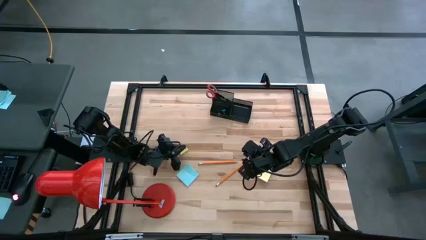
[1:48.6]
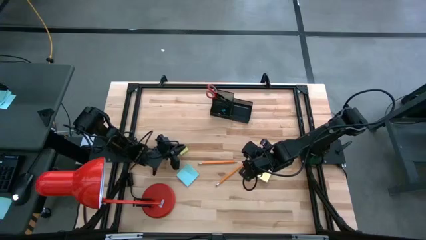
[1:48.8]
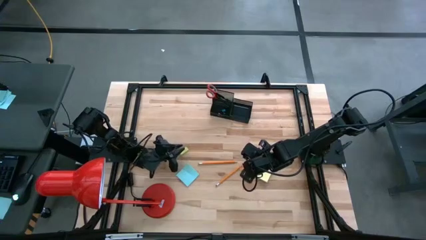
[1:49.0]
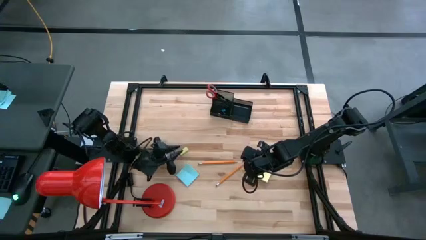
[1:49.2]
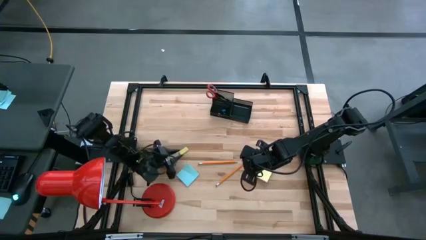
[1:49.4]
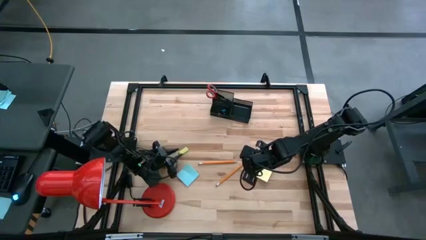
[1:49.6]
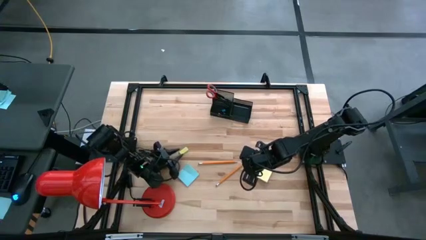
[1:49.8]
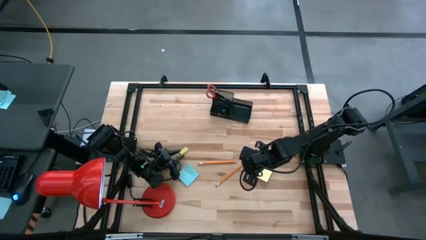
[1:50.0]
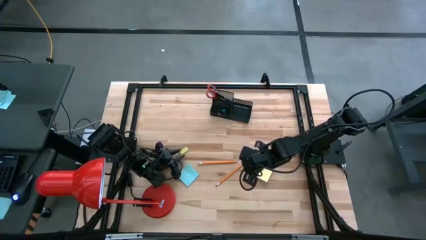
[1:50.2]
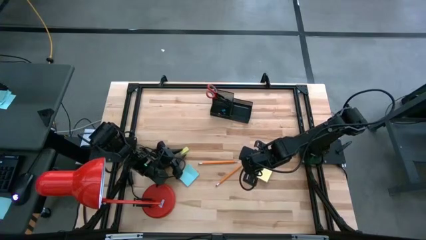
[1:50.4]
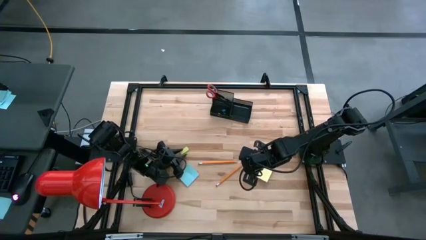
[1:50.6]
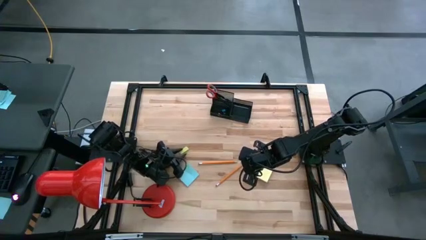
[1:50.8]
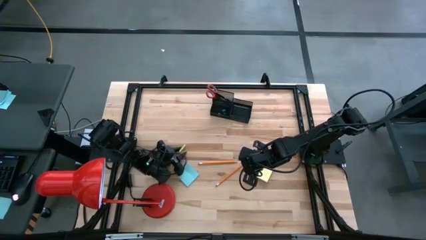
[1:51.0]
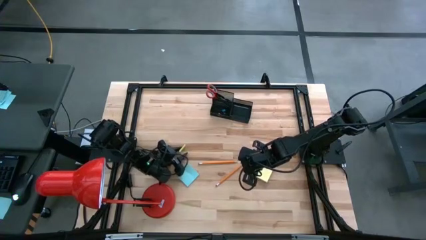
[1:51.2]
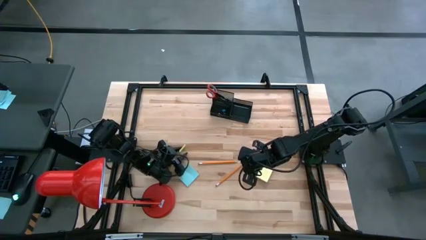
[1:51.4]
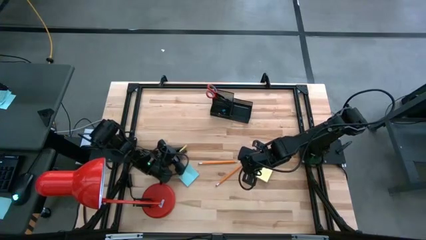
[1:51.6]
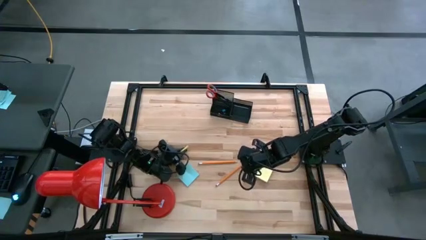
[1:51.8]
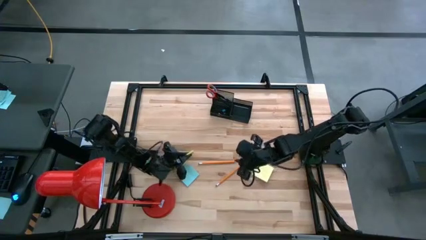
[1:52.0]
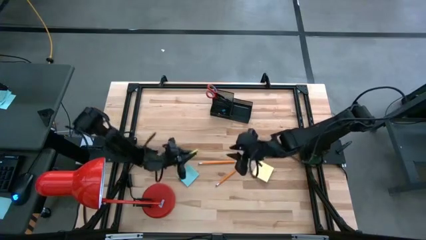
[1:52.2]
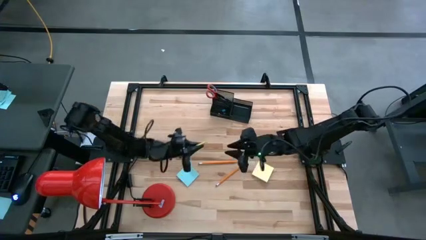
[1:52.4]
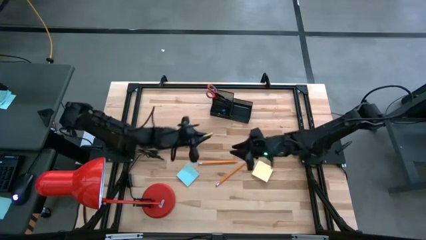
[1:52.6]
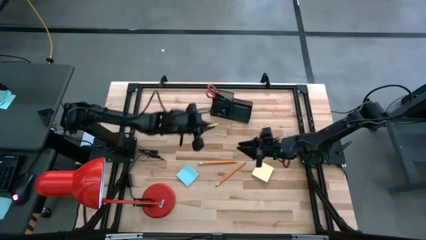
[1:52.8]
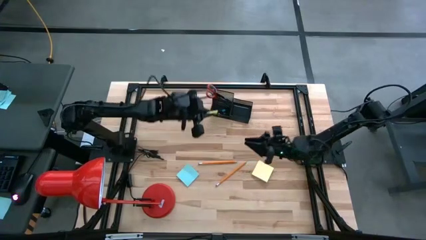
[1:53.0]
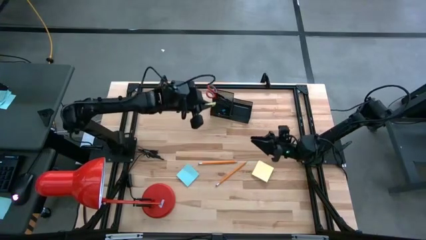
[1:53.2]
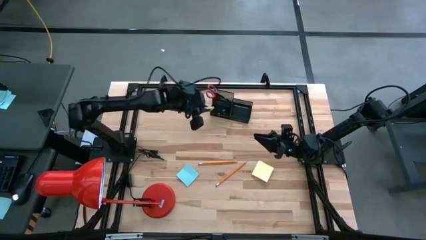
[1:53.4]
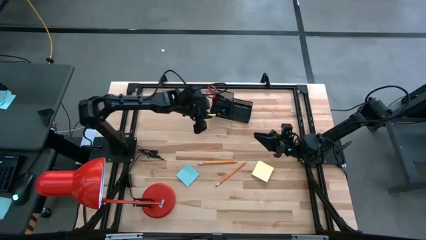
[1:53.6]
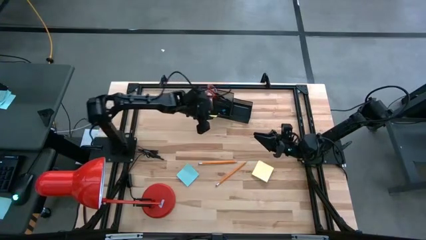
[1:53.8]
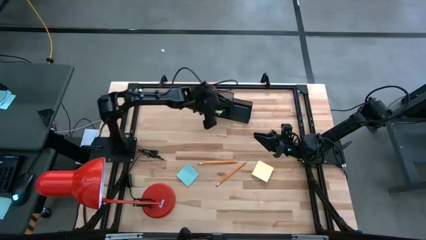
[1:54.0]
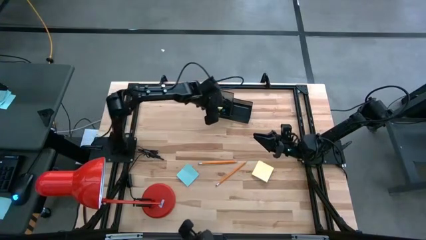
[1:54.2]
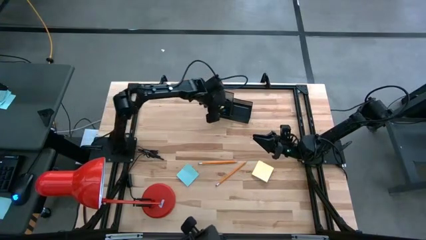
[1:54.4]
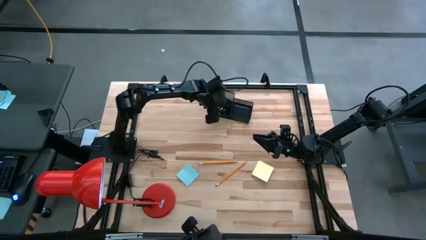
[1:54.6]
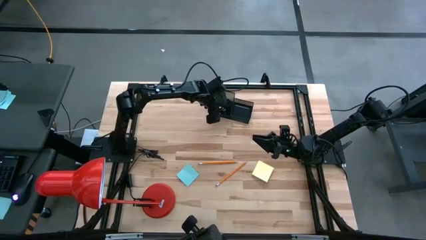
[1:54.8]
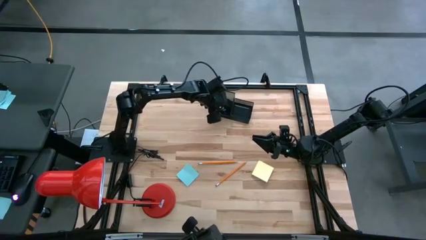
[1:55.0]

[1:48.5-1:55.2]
Task: Pick and place office supplies into organizer
Put the green eraser in the black desk organizer

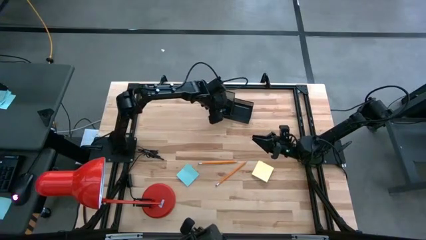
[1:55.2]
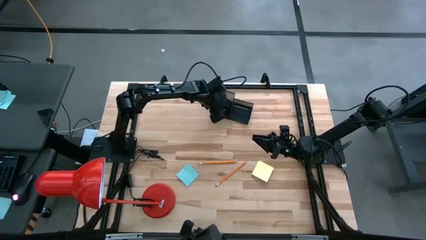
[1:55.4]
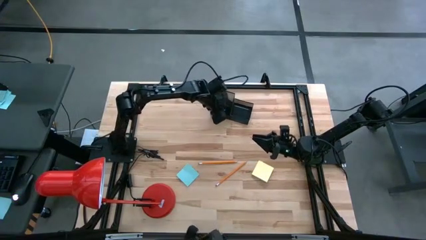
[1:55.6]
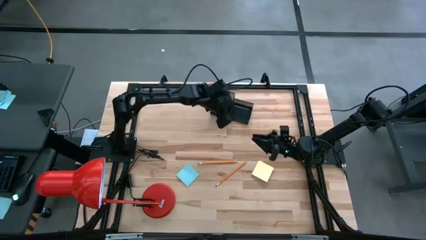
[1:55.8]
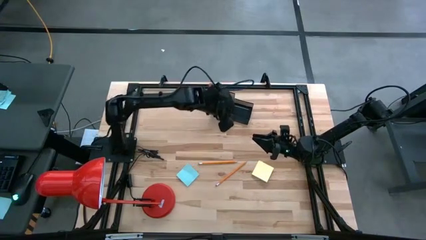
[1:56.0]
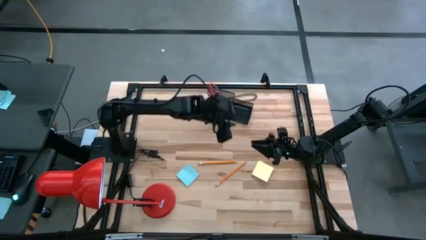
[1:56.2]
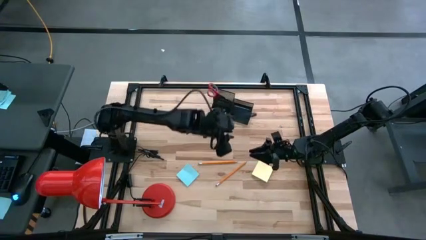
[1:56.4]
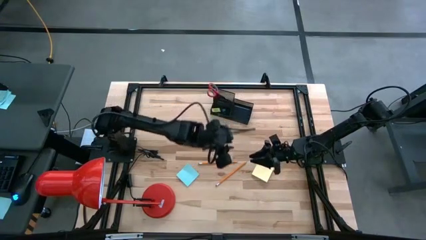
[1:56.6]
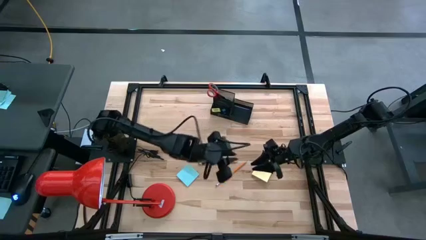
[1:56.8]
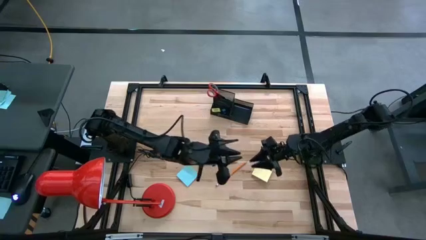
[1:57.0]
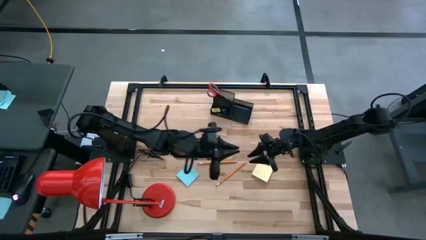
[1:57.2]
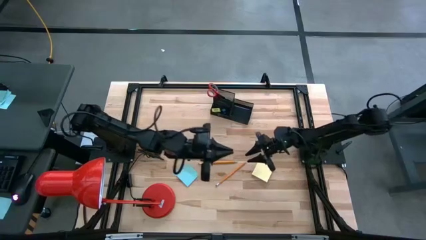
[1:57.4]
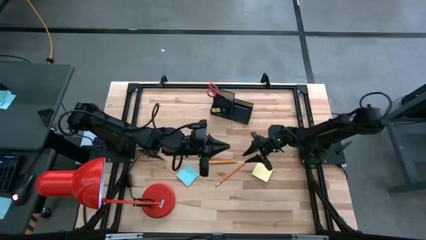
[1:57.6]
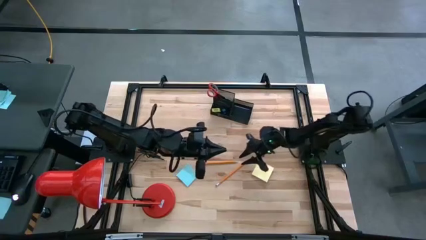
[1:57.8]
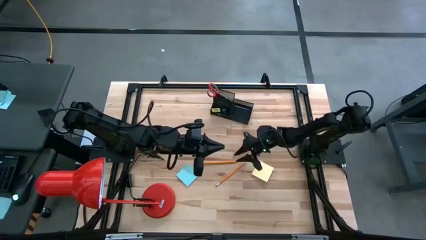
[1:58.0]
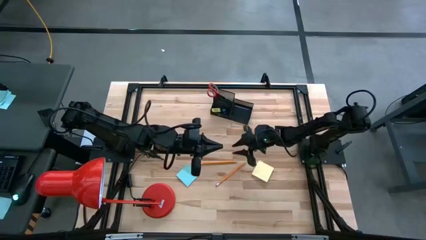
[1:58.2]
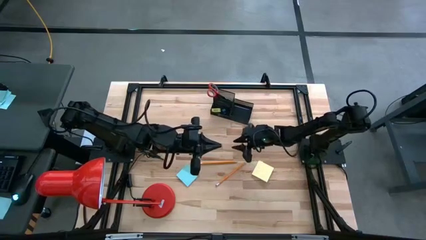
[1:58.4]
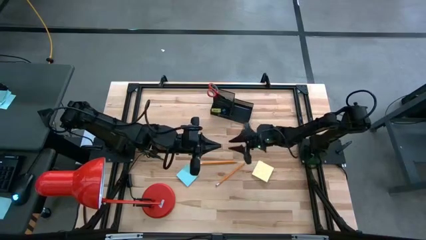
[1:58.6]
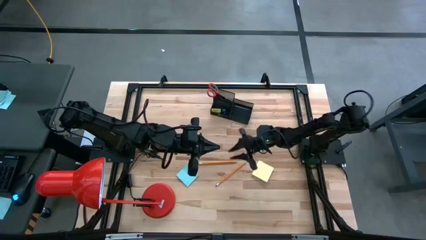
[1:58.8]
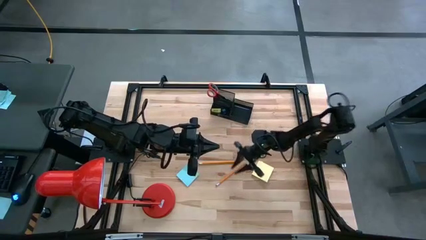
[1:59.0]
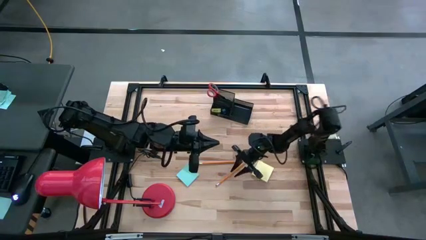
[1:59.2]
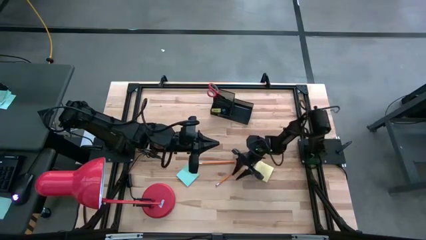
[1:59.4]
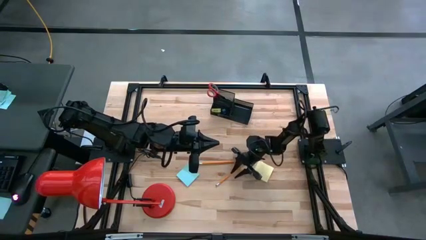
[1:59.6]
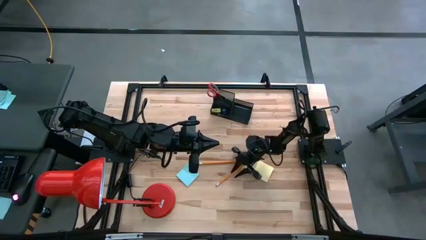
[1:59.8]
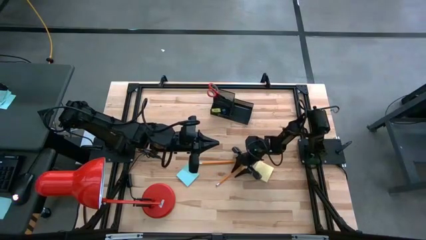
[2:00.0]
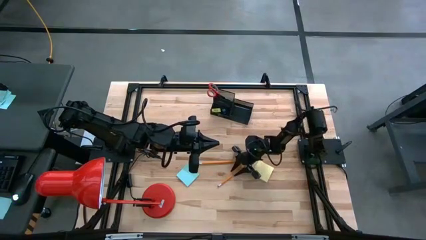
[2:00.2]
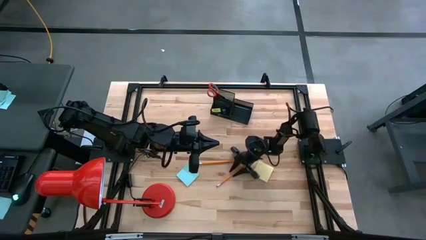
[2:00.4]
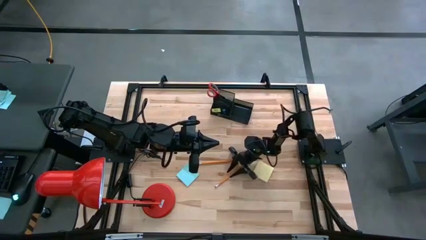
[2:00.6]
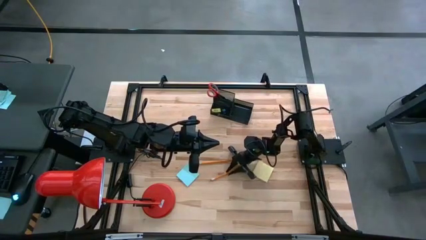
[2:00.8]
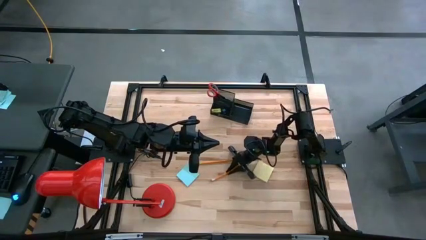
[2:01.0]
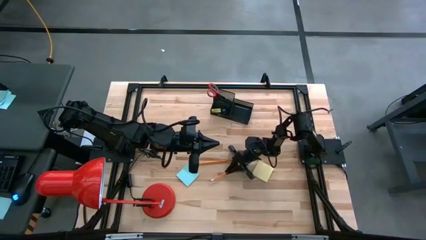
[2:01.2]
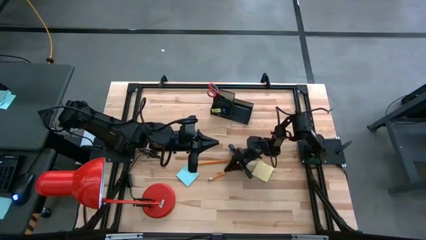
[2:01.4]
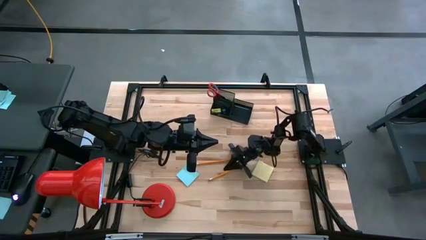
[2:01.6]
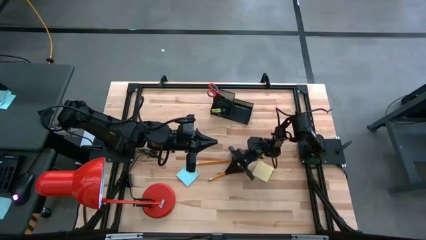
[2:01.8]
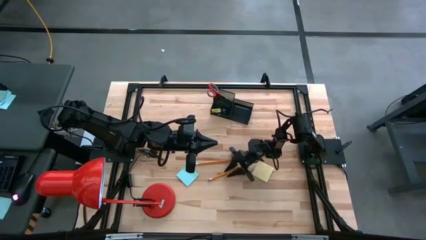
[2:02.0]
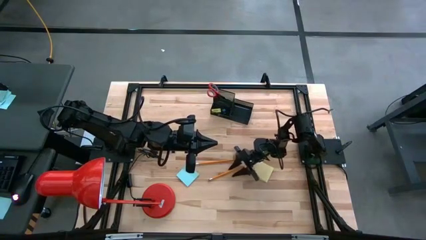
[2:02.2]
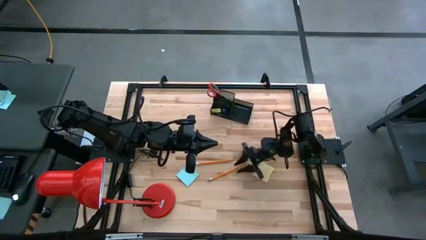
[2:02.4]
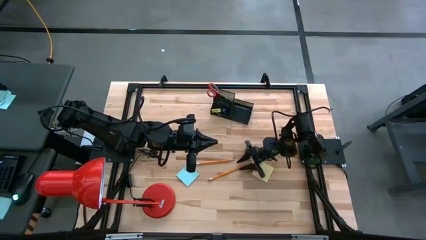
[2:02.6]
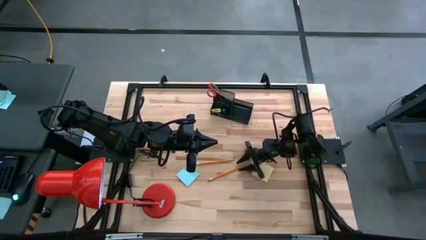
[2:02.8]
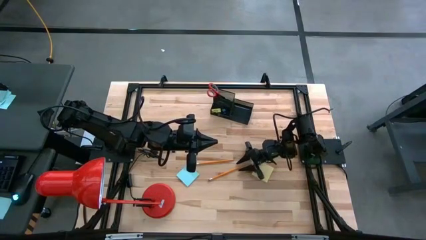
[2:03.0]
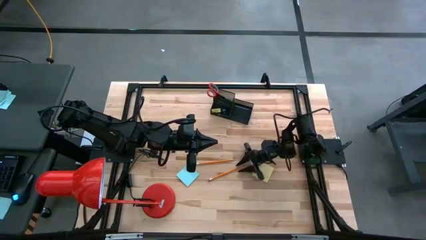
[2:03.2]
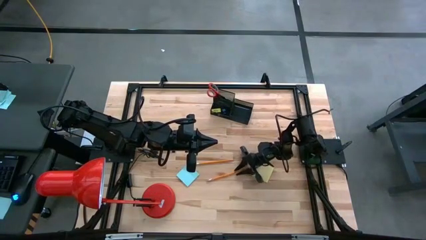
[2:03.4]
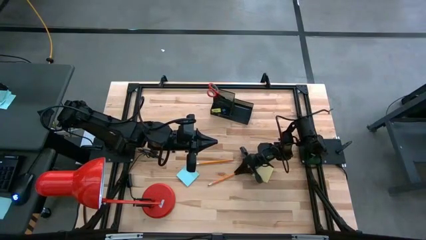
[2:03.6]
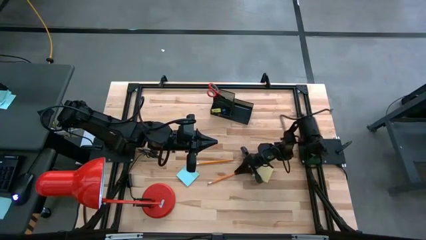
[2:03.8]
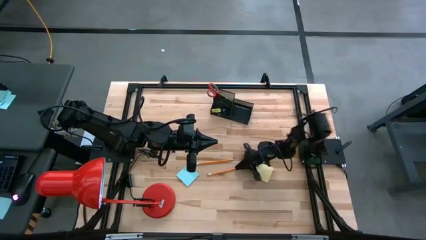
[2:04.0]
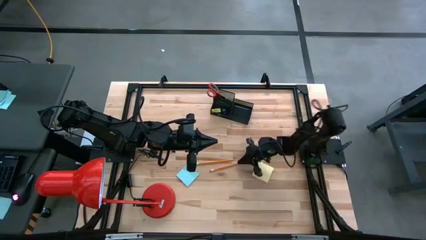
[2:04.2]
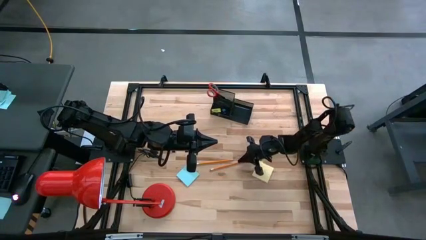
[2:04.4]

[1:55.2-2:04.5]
Put the bottom yellow pencil in the black desk organizer
